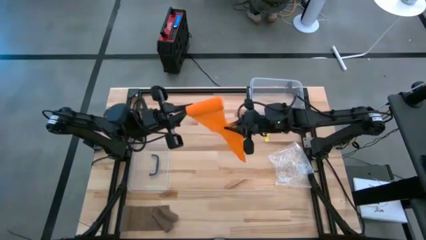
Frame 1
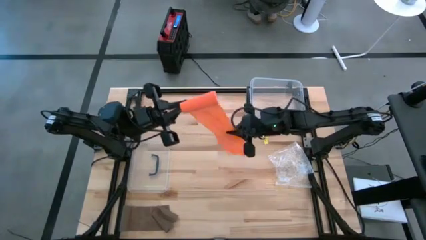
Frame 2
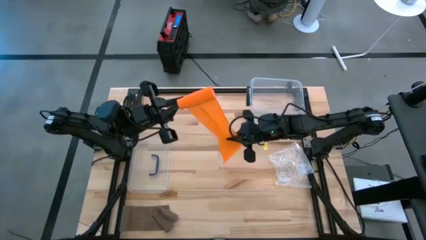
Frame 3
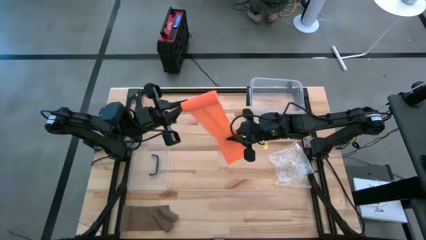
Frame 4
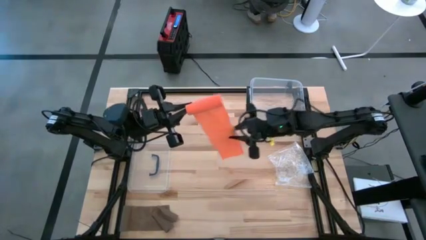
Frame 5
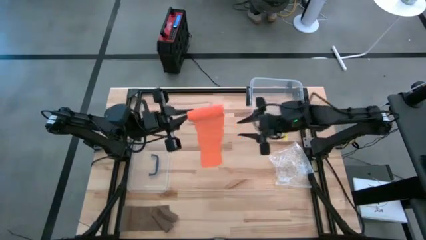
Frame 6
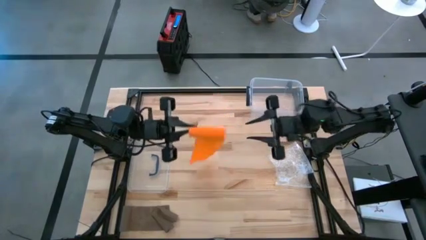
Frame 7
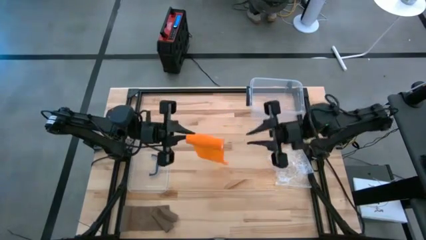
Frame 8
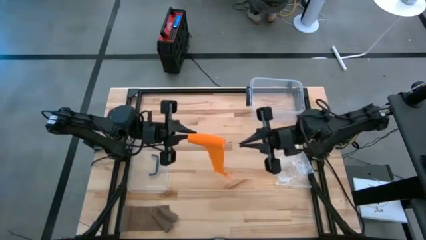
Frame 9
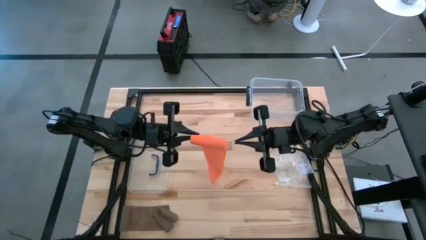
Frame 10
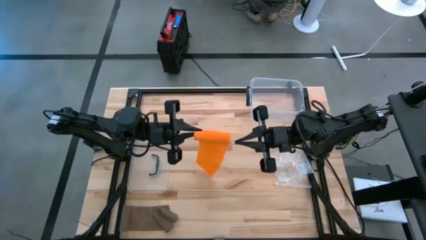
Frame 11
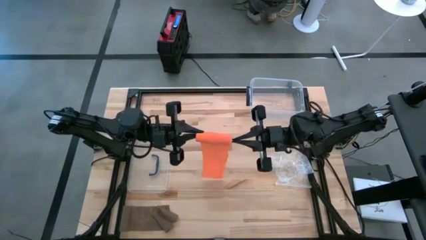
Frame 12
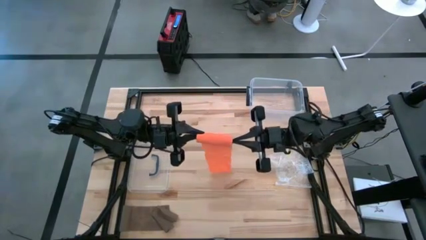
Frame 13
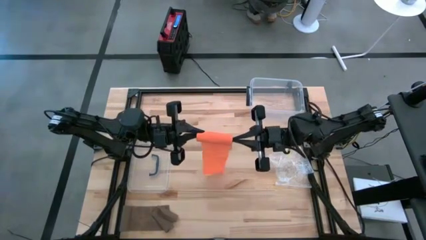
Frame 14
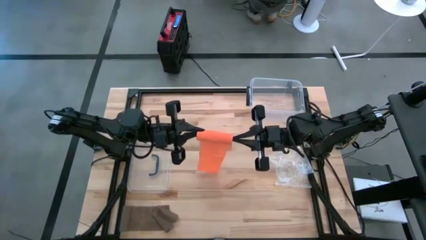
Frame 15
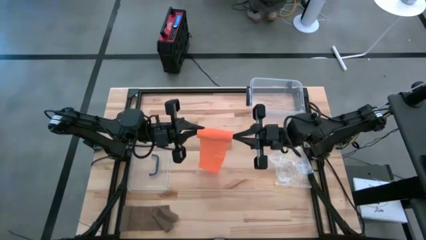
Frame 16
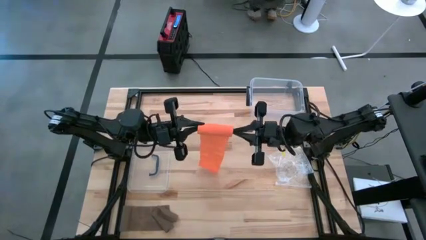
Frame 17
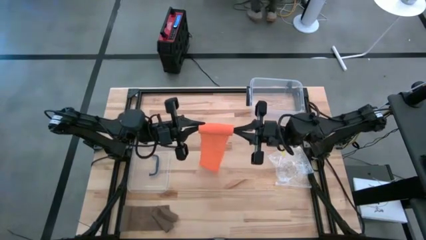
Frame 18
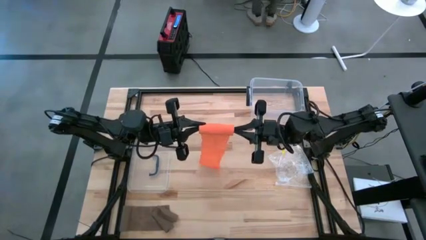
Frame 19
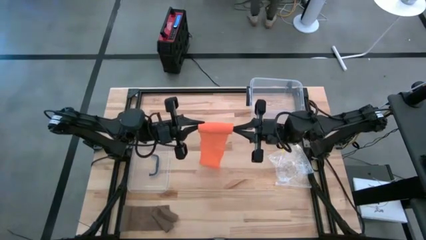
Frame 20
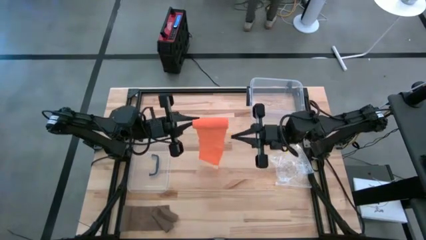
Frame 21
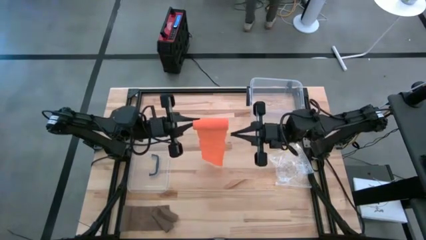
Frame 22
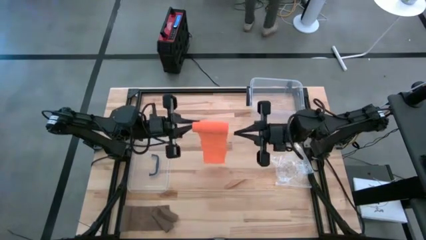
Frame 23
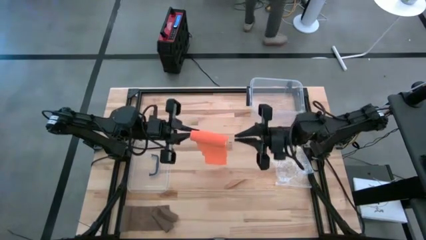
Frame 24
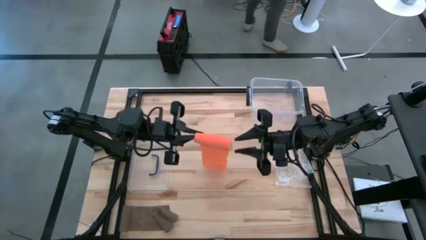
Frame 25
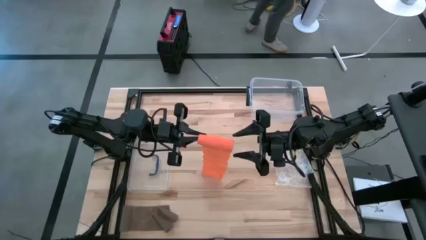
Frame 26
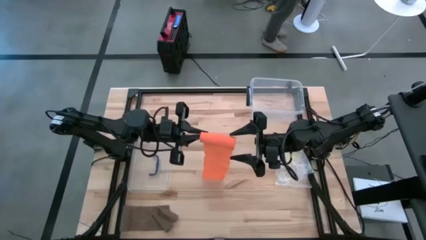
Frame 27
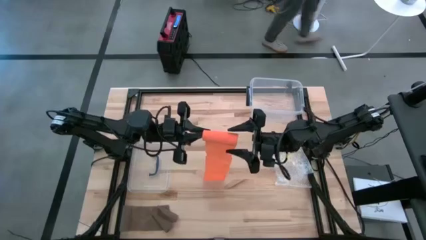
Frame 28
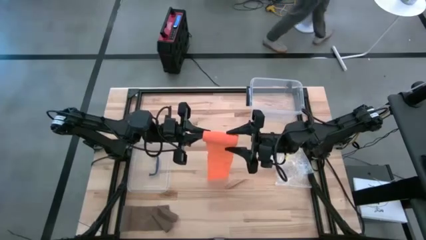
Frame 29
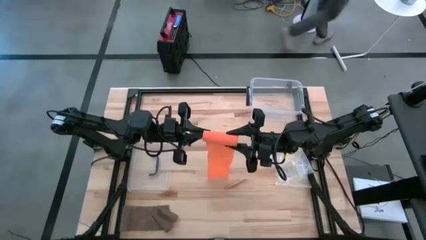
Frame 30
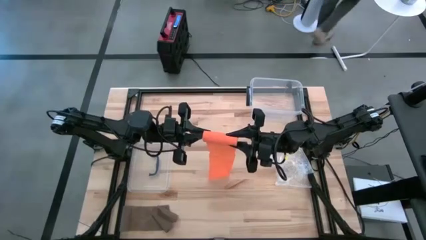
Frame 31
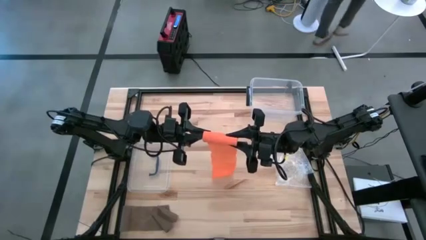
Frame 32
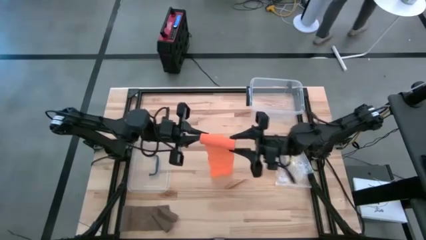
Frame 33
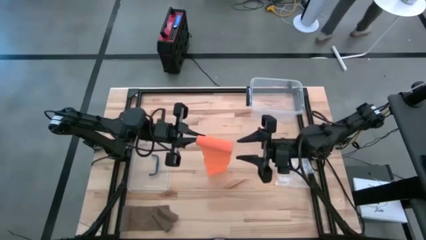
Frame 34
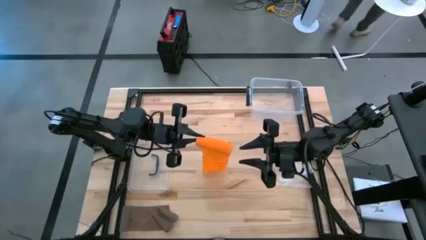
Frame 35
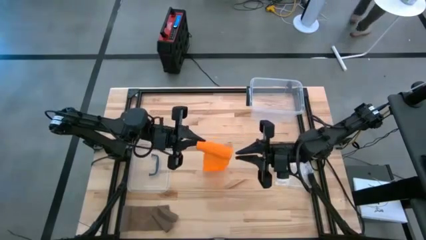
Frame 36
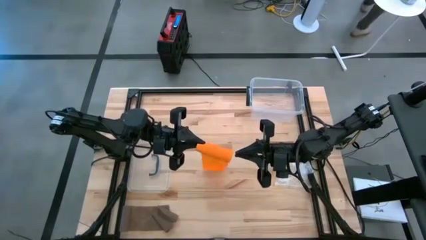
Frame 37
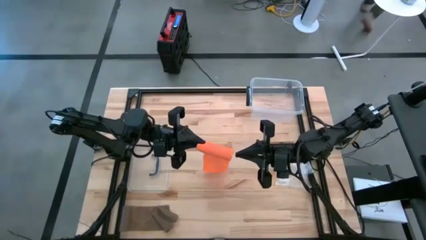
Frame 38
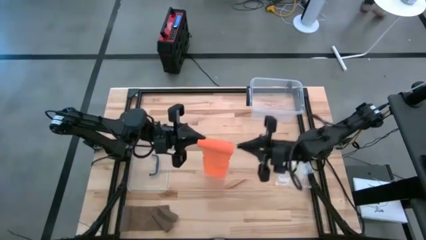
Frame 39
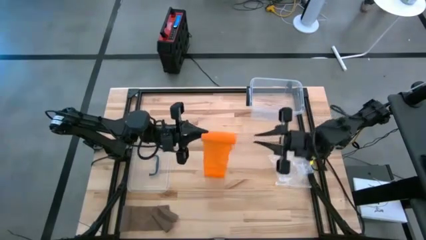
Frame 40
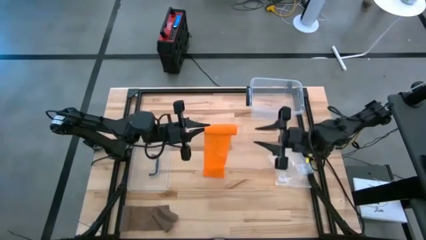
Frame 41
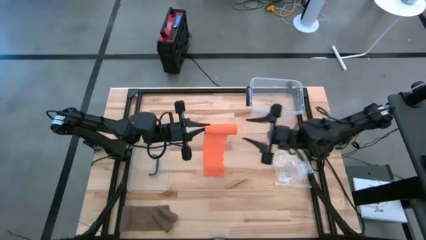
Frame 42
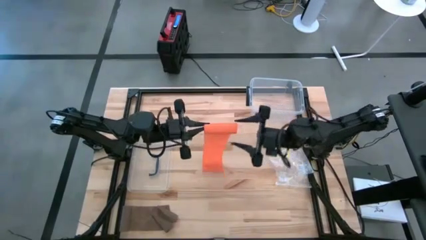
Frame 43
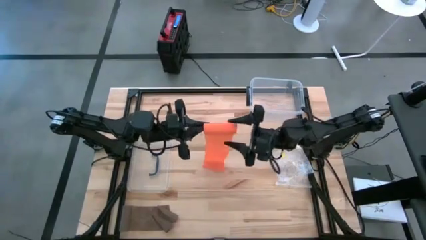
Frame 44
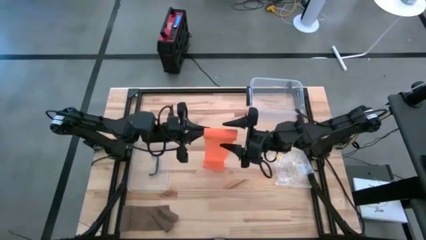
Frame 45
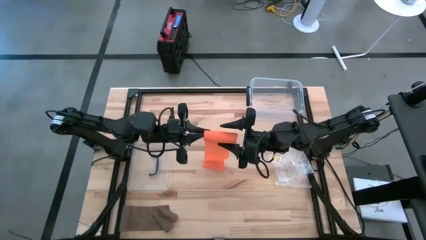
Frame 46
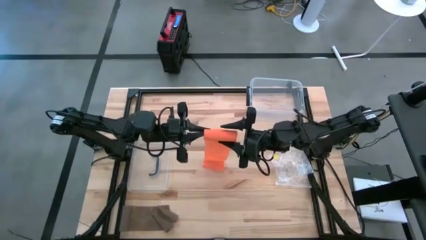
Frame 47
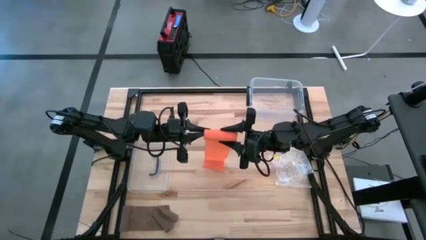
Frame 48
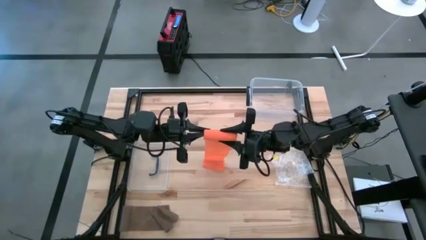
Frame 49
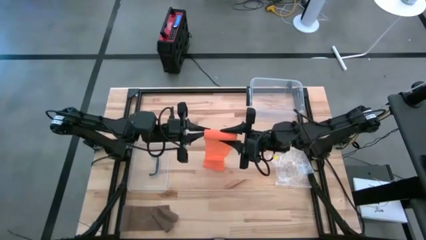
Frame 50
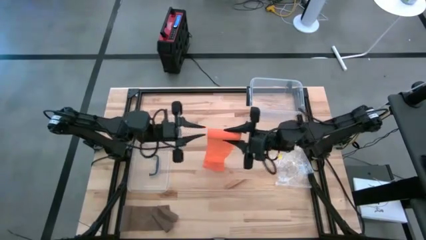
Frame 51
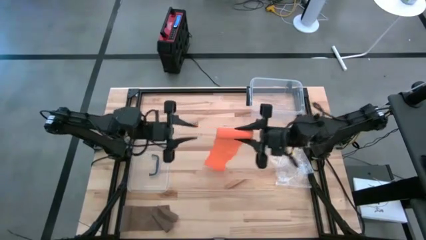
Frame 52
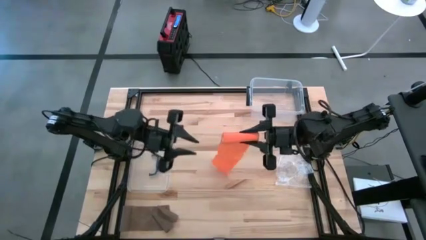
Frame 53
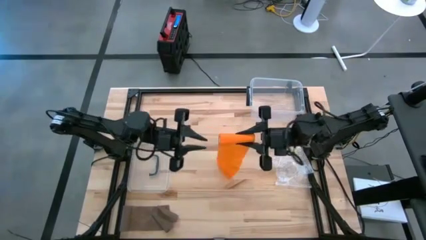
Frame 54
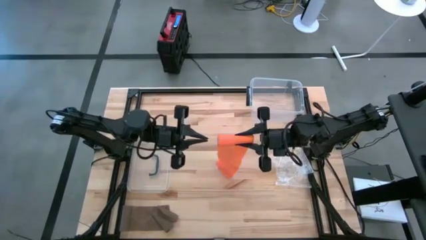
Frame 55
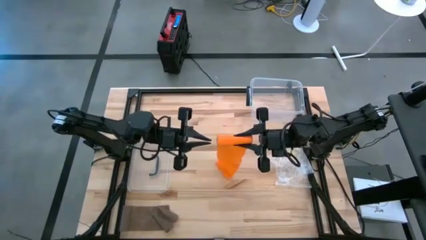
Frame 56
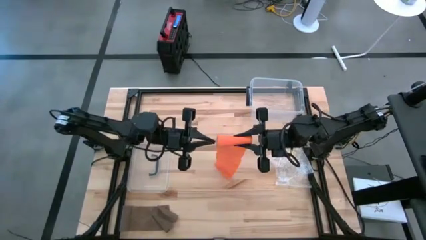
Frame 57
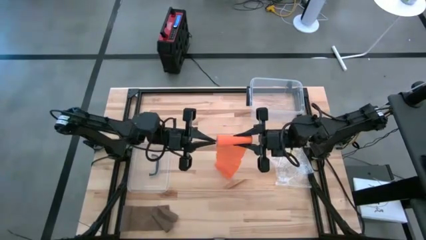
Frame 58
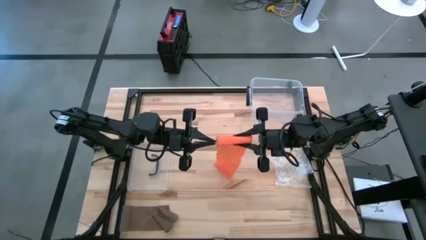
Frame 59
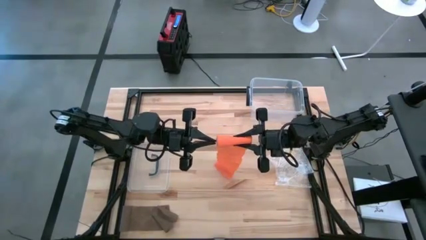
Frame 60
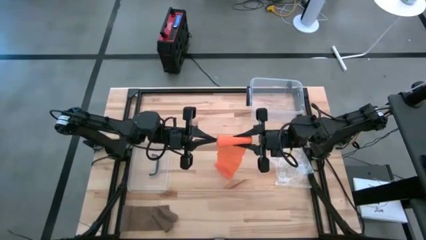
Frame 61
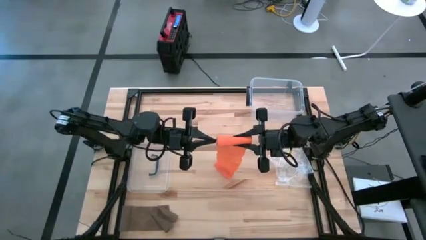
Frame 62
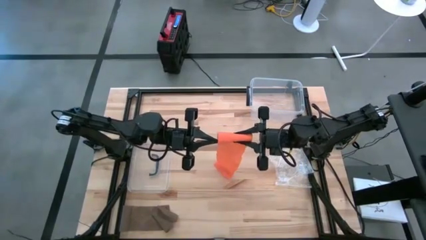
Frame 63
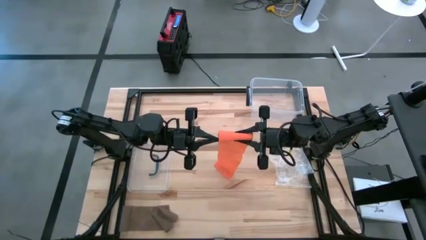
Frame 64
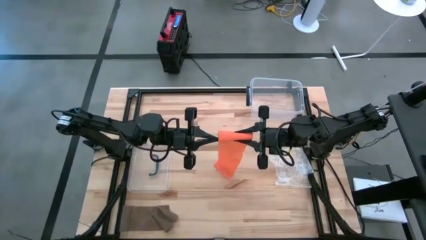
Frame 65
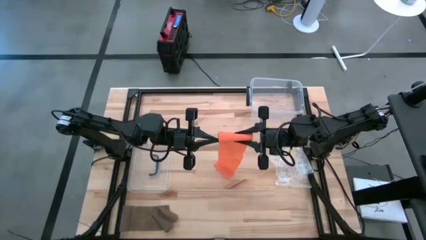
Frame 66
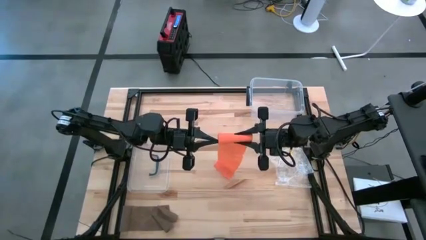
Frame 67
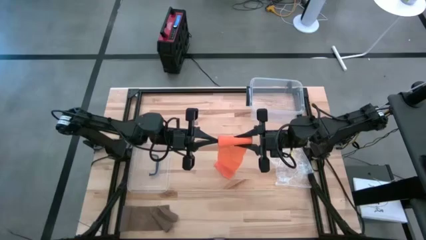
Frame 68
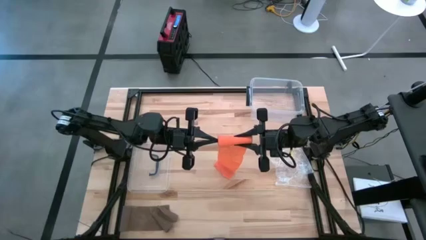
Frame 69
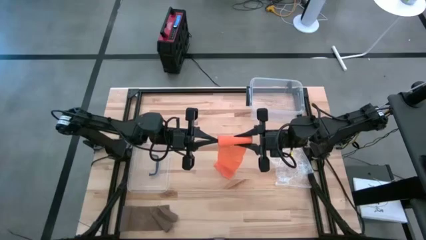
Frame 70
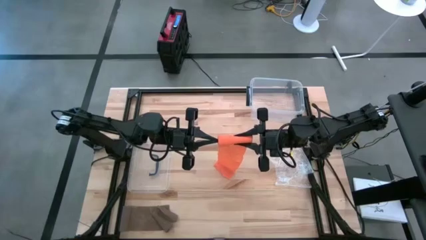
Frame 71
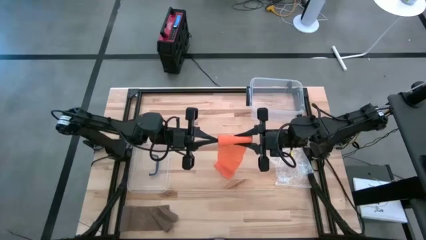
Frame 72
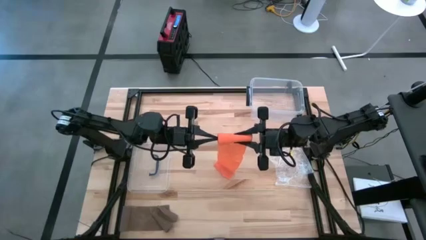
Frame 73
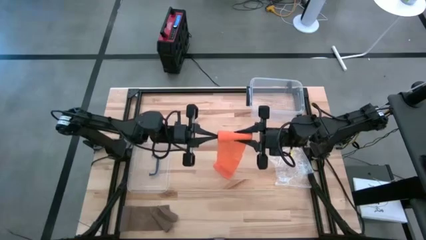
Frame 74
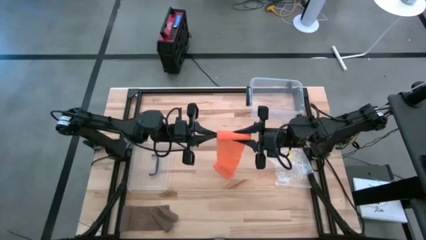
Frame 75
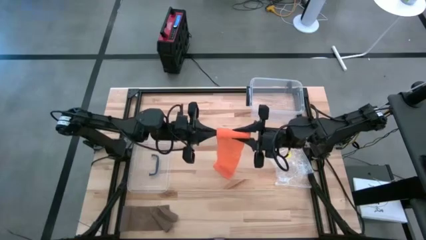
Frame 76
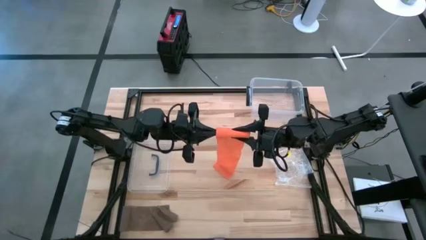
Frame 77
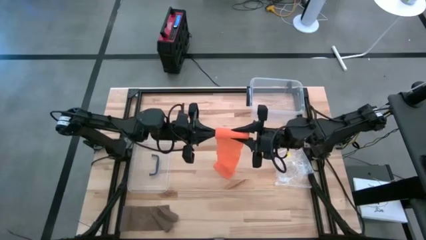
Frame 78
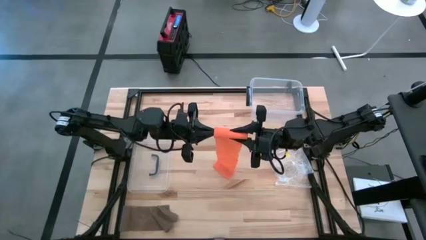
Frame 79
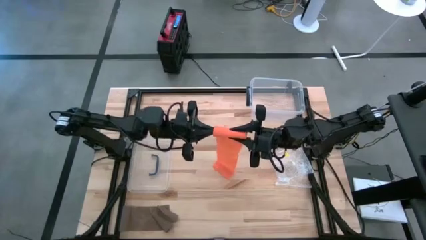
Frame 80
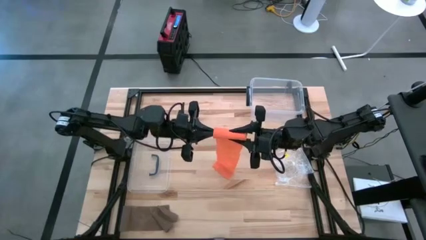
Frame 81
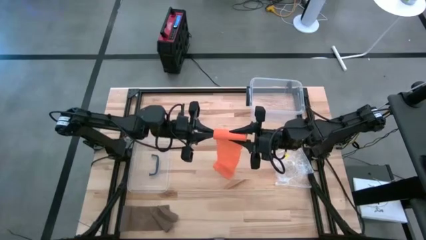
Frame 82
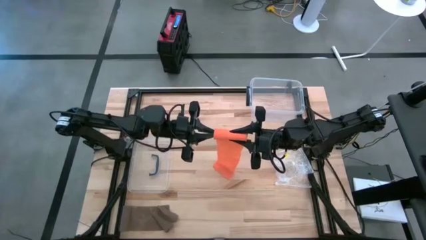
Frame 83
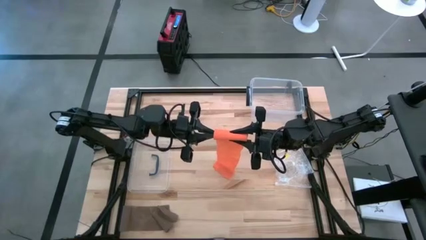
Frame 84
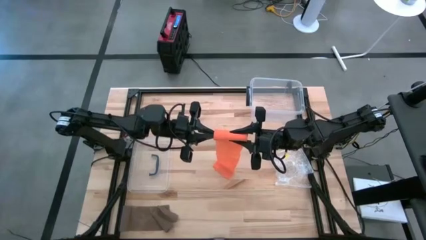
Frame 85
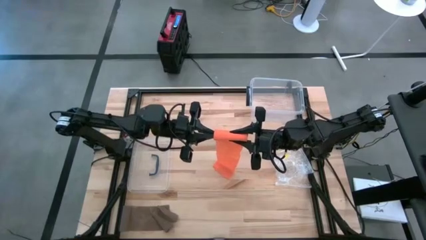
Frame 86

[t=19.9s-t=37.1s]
Task: Roll bandage
Roll the orange bandage
